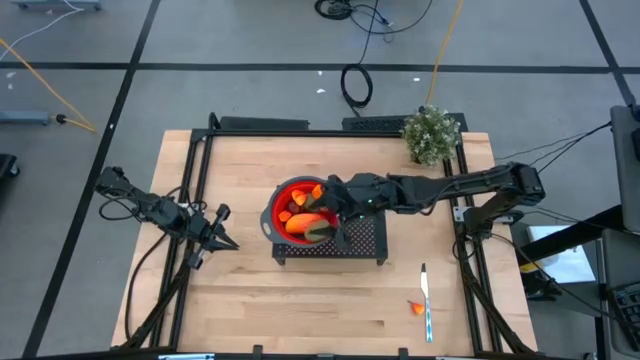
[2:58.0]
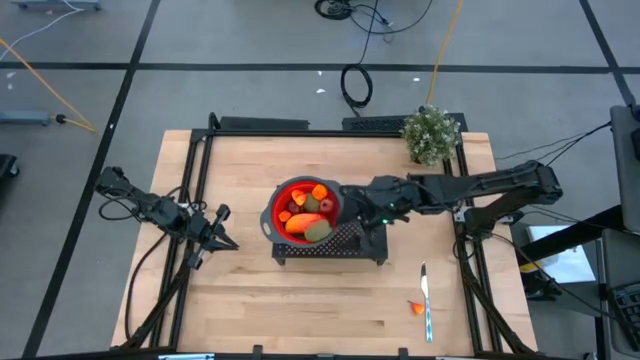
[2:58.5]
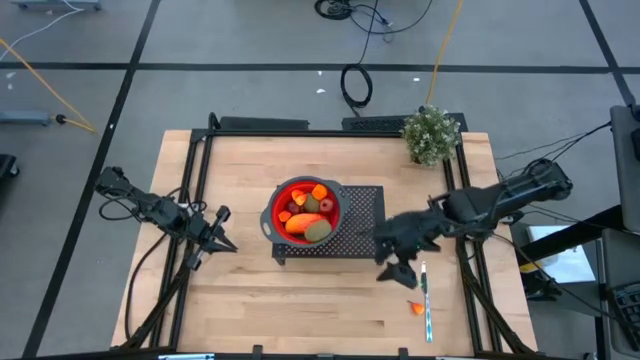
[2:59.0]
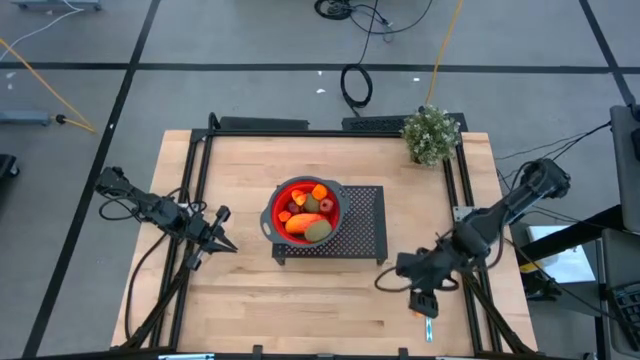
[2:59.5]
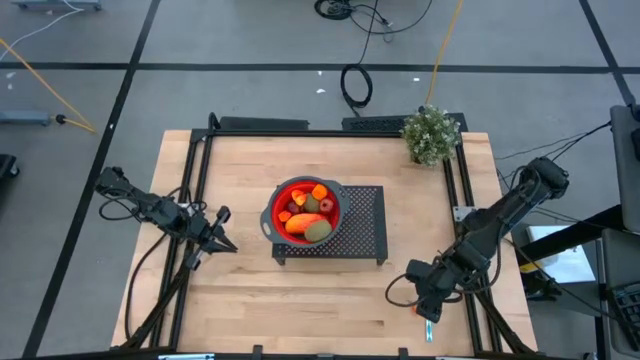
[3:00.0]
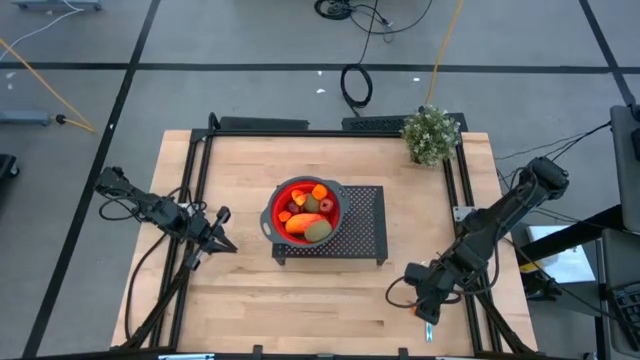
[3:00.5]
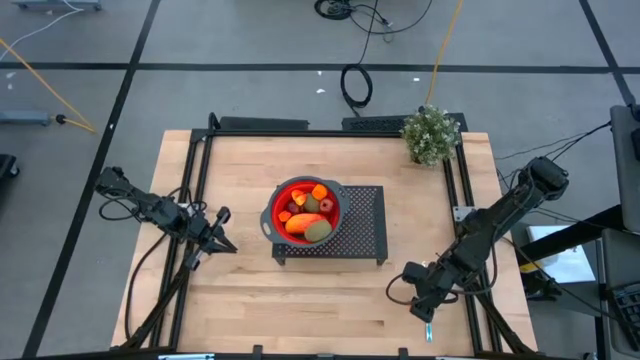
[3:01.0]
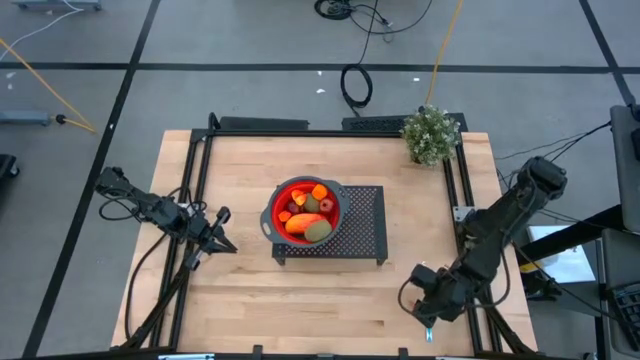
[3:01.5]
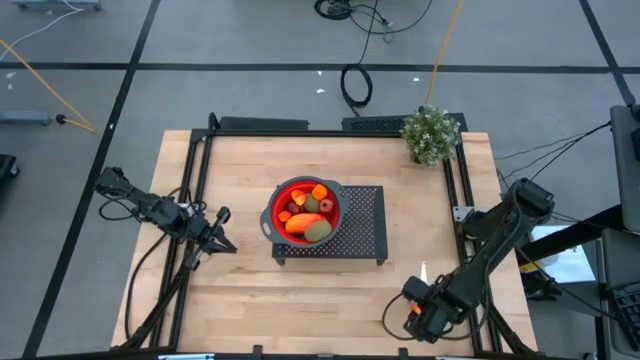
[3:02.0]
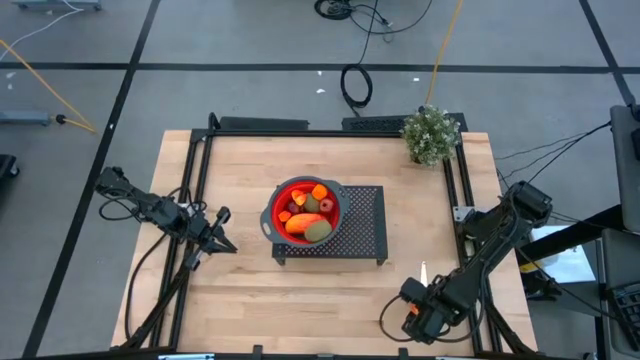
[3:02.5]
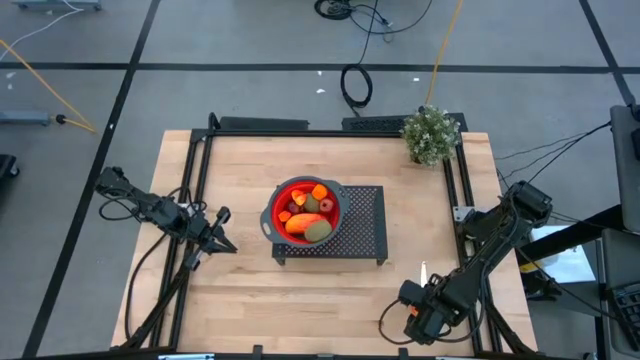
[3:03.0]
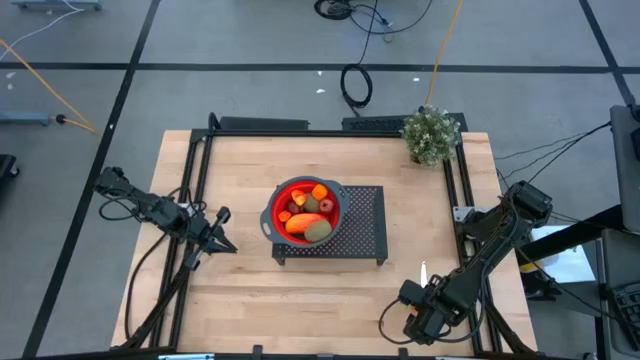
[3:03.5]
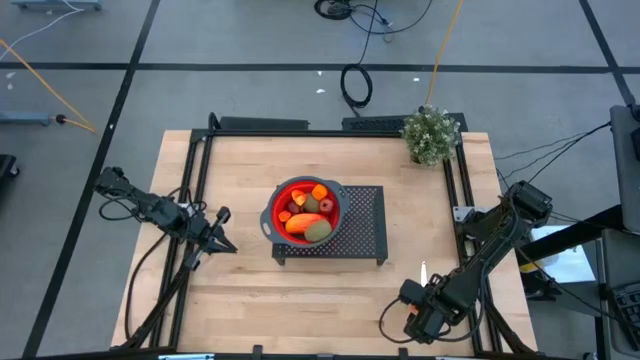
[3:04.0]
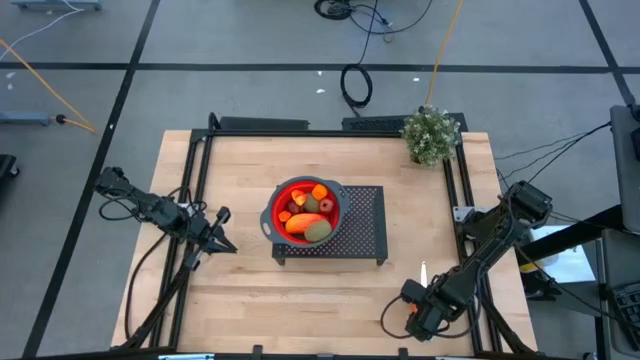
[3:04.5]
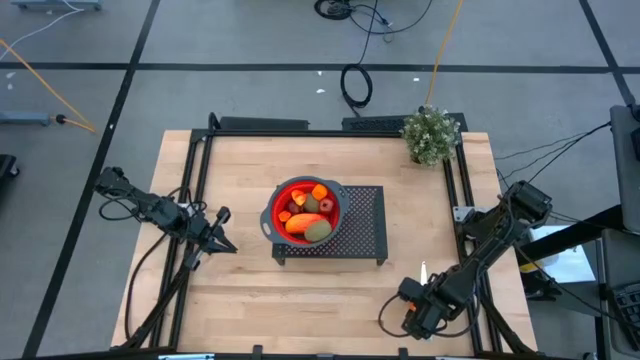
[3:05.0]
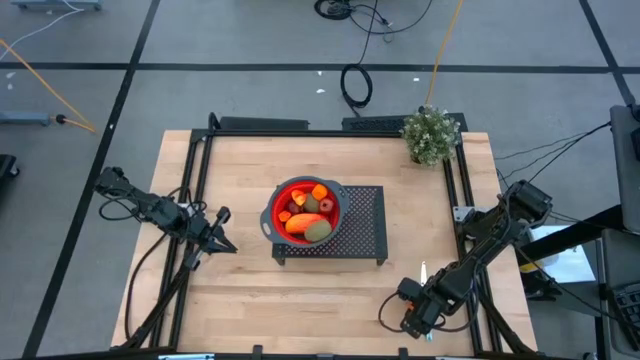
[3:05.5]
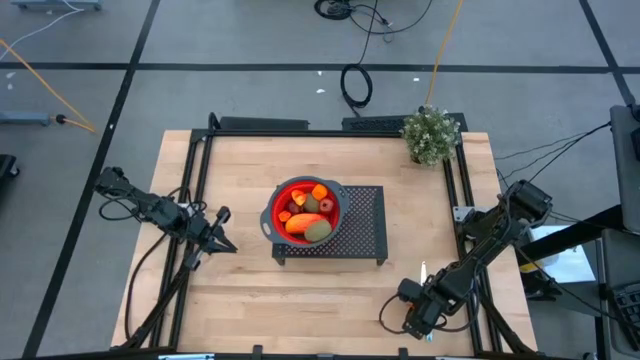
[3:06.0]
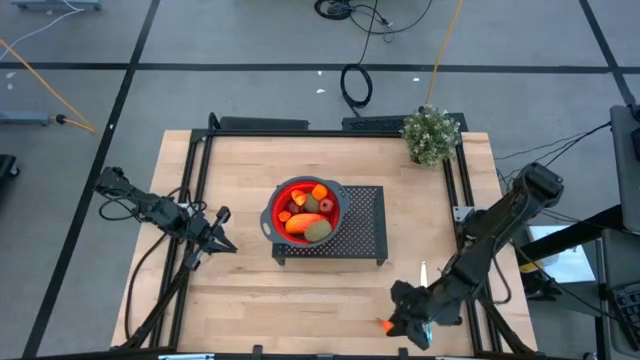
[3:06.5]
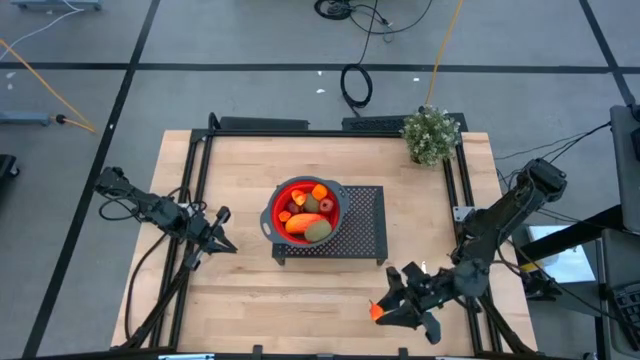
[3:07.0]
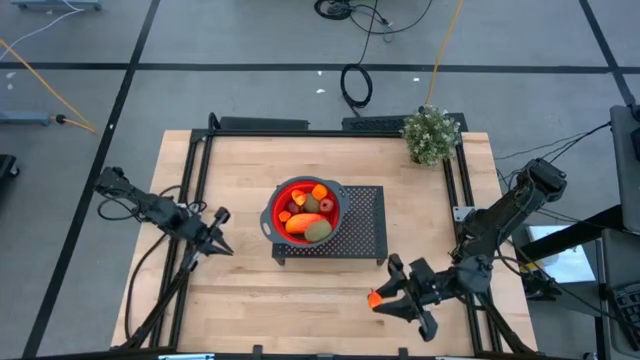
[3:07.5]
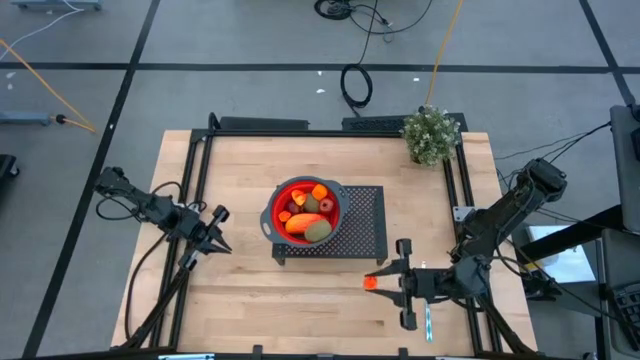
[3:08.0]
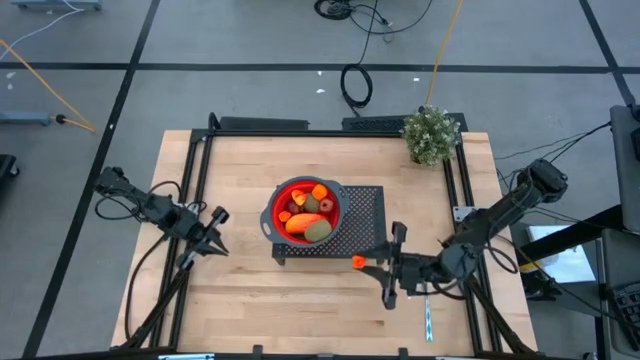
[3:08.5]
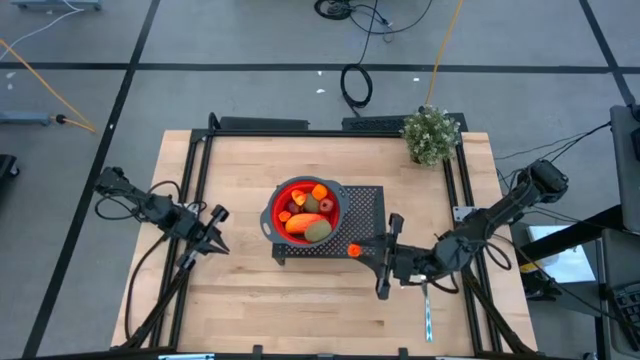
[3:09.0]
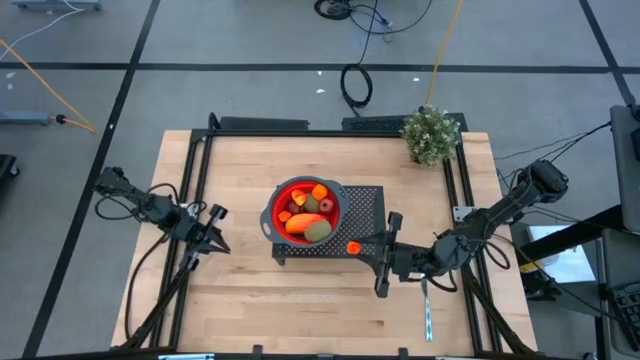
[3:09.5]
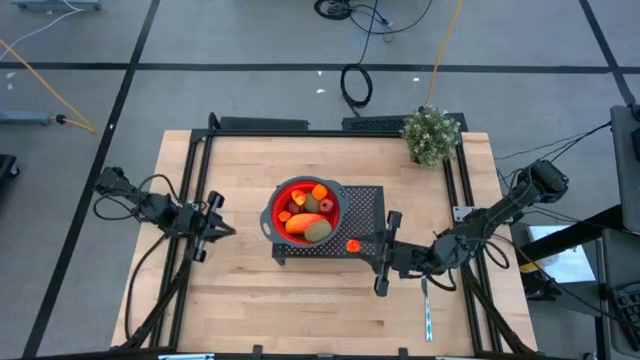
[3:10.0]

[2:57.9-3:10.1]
Task: Pick & Place Fruit
Put the orange pear into the bowl on the shelf

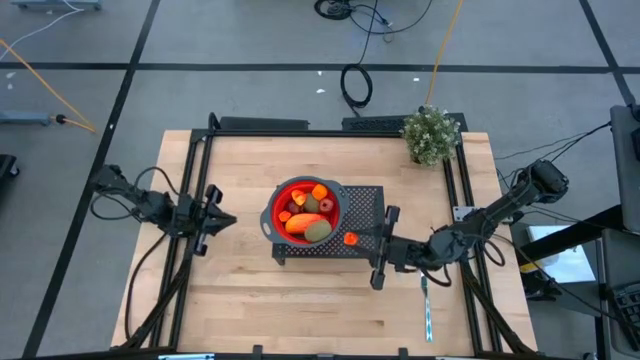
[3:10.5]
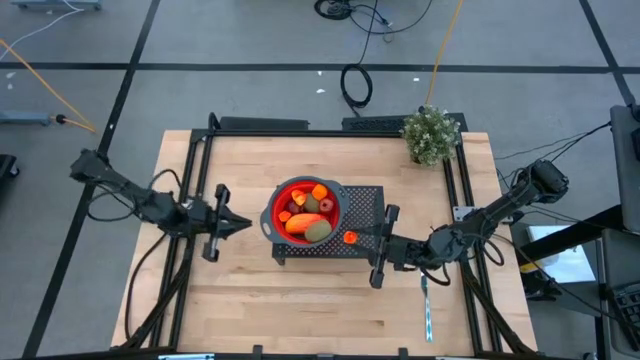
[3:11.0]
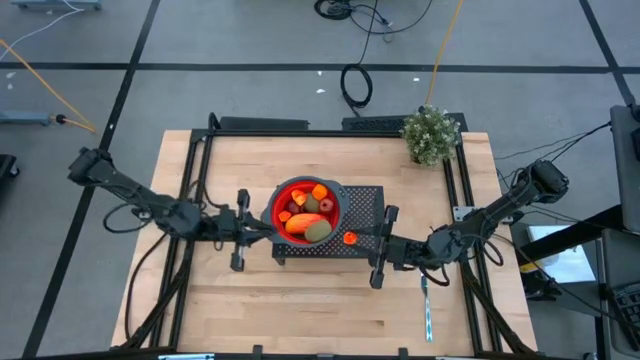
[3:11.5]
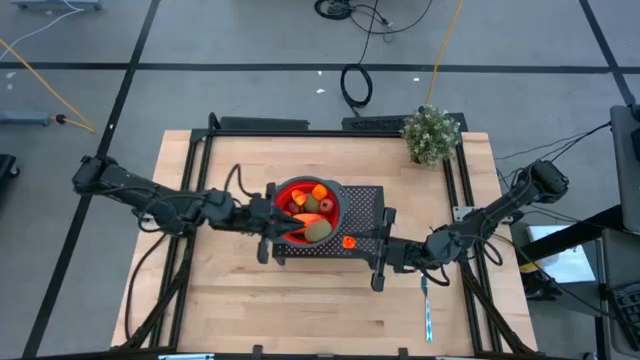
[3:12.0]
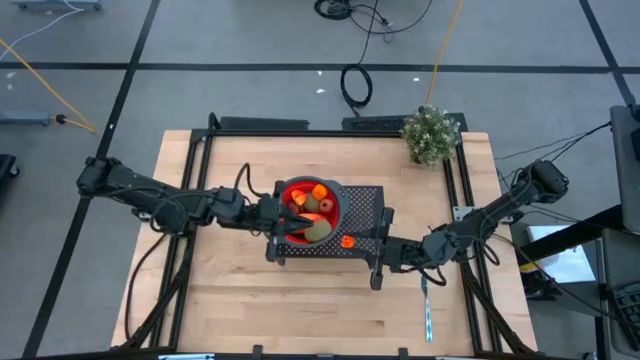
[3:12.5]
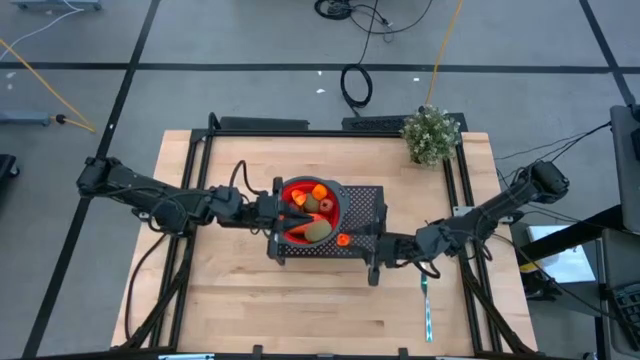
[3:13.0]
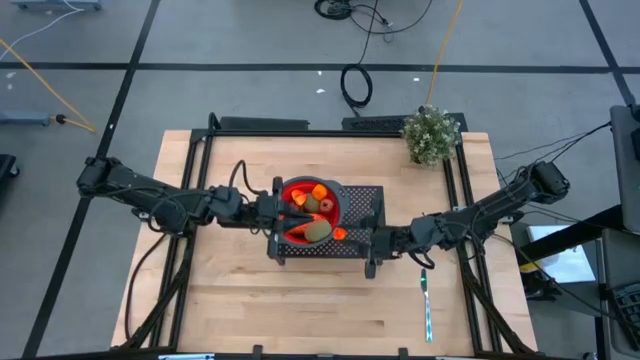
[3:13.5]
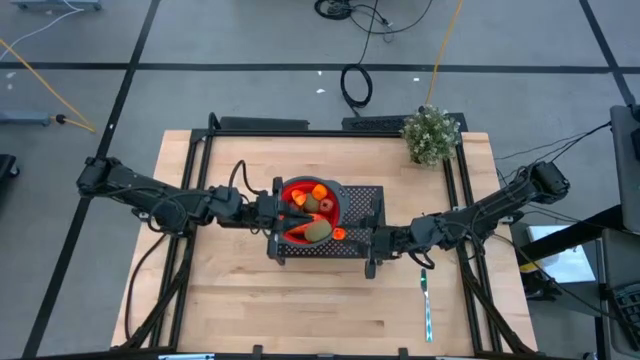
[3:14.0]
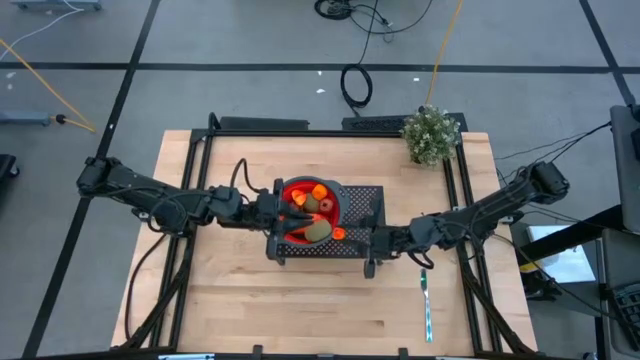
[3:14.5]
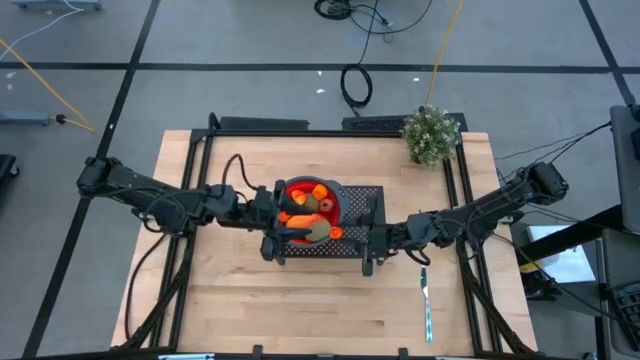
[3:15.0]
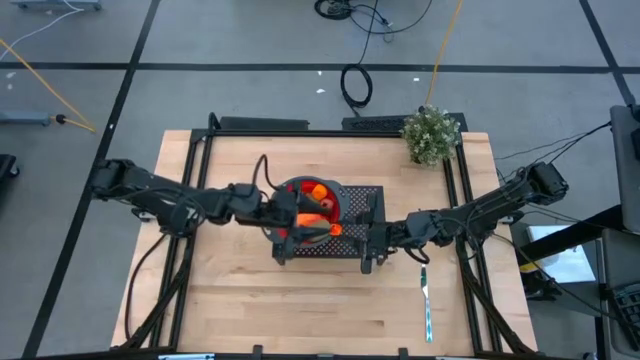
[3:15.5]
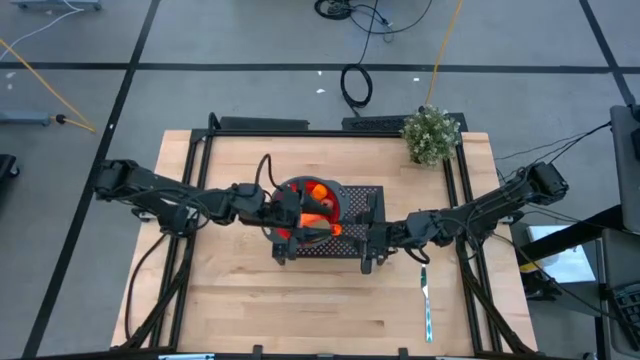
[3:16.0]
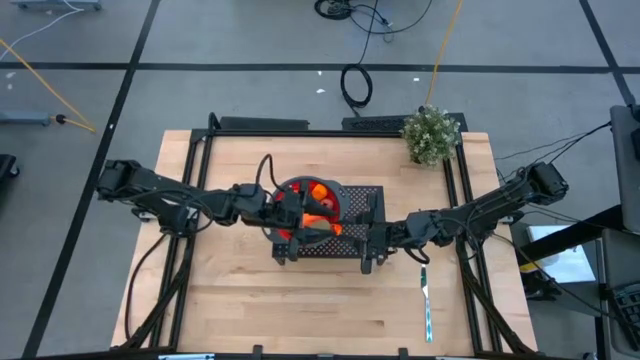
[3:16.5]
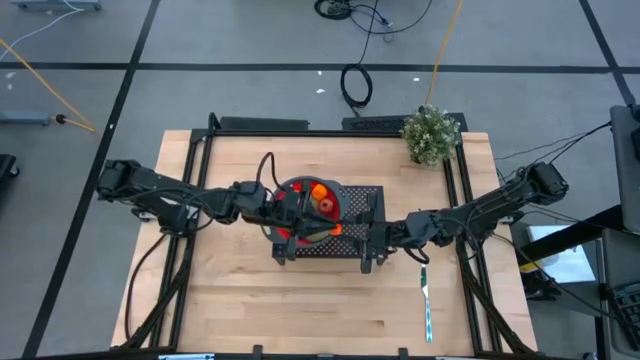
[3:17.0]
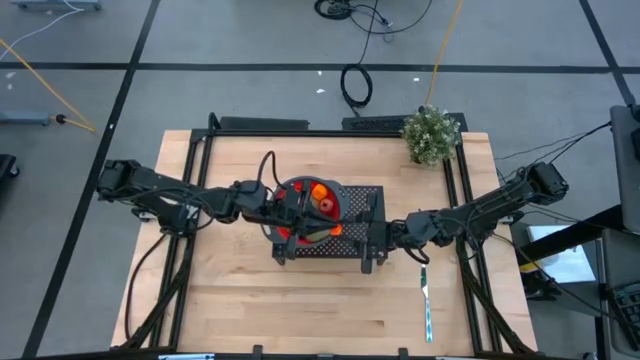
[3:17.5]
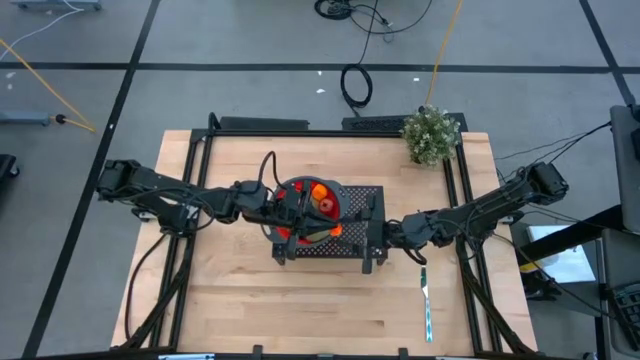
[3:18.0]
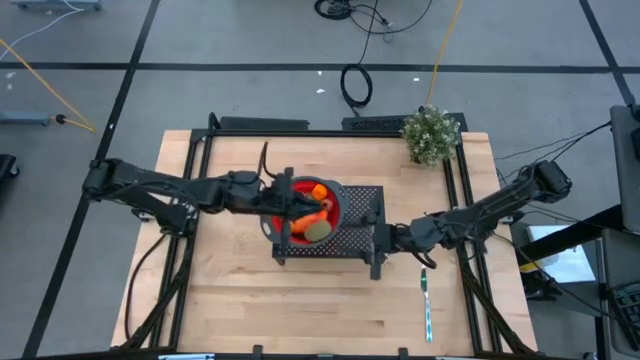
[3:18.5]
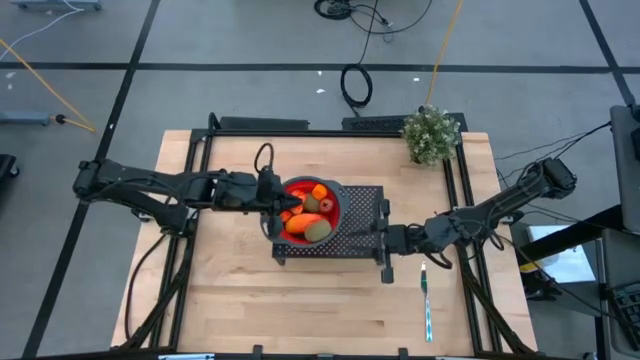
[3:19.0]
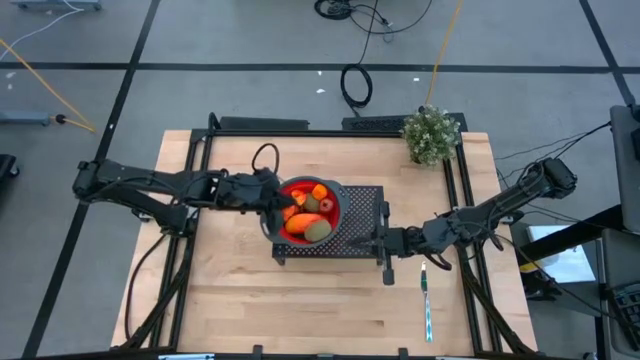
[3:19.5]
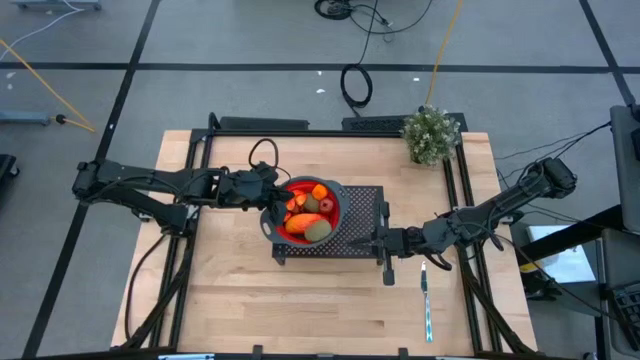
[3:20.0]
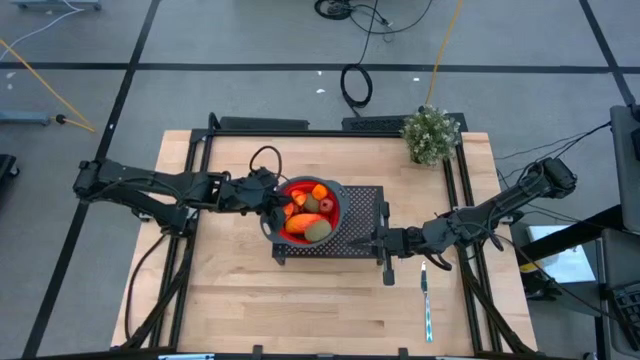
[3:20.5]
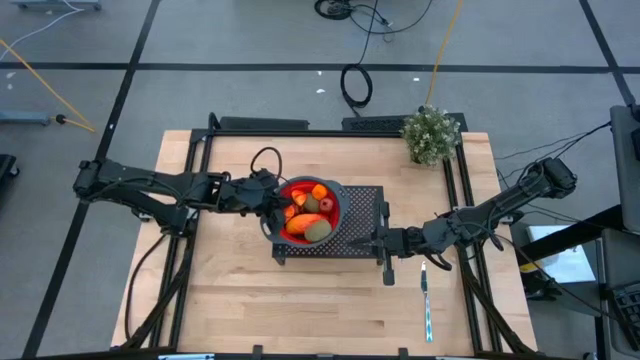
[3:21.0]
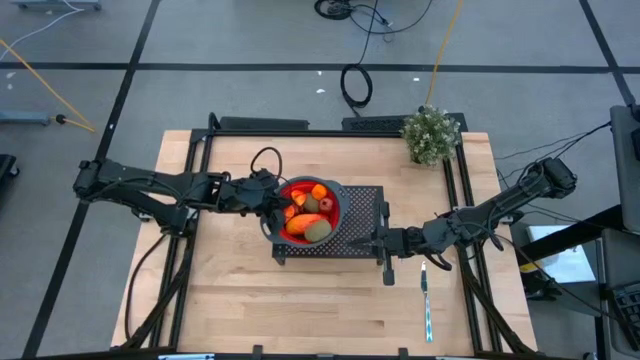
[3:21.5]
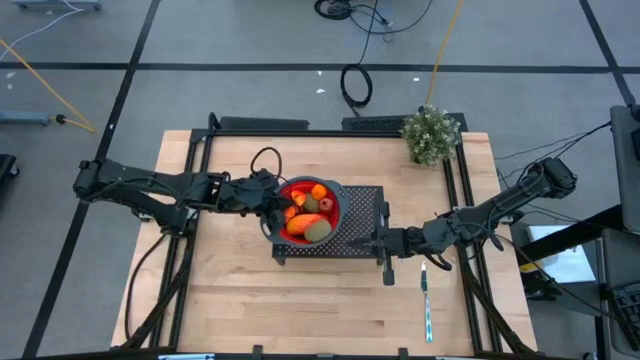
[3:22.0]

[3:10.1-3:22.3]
Put the orange pear into the bowl on the shelf
